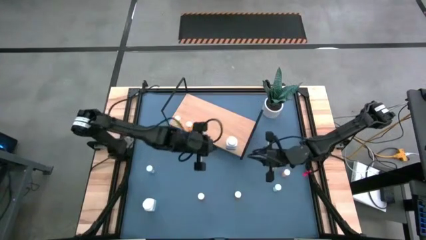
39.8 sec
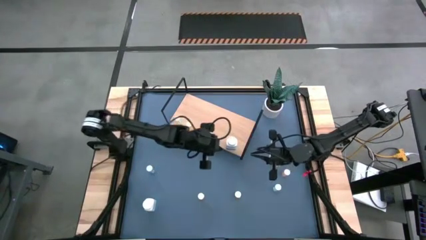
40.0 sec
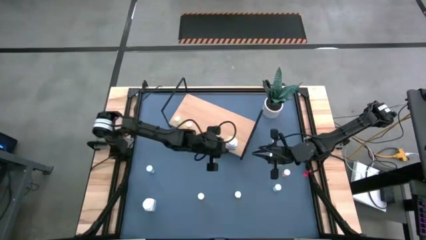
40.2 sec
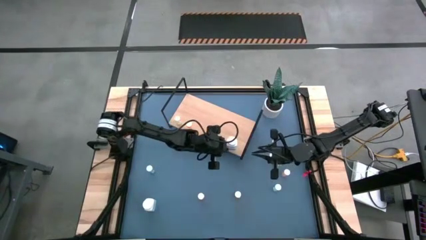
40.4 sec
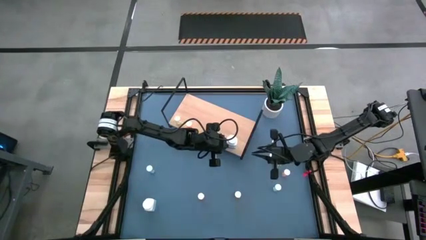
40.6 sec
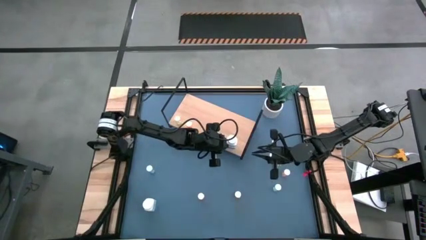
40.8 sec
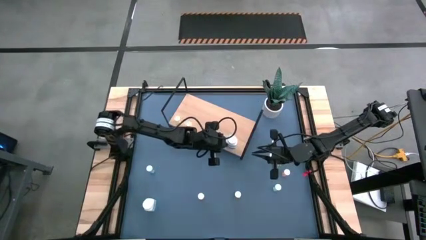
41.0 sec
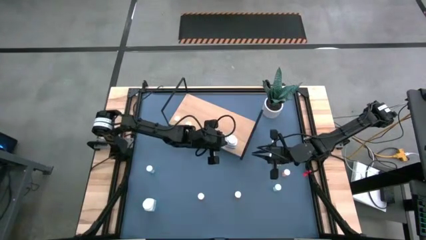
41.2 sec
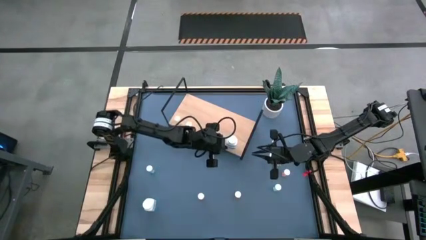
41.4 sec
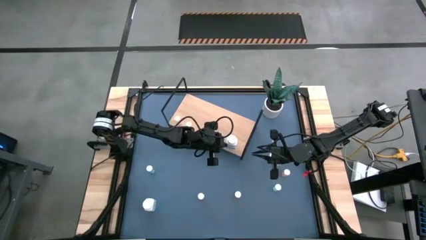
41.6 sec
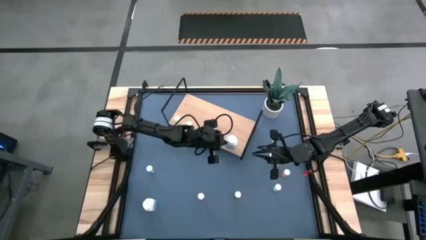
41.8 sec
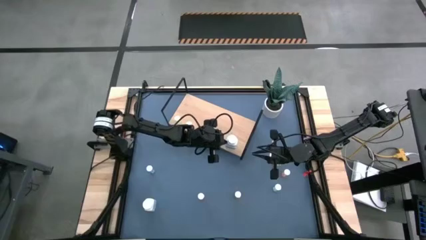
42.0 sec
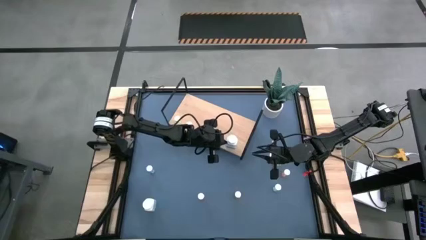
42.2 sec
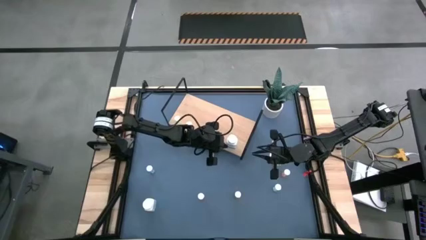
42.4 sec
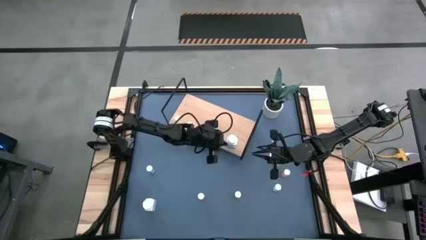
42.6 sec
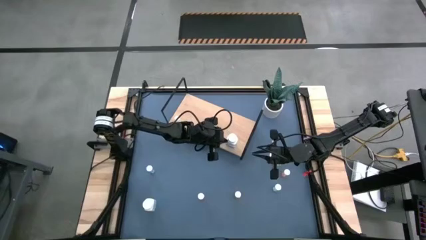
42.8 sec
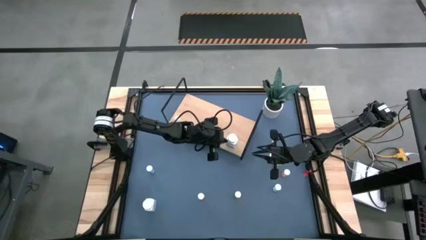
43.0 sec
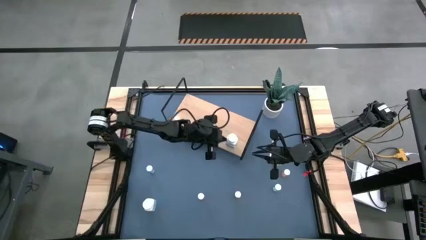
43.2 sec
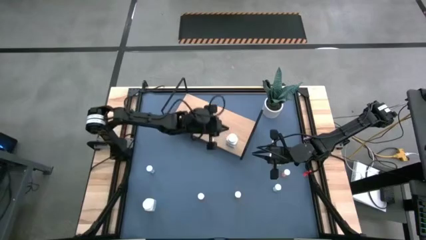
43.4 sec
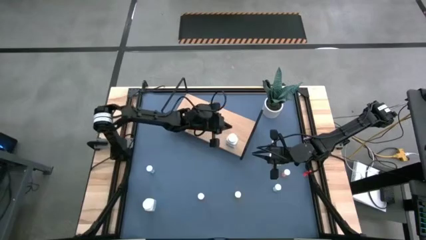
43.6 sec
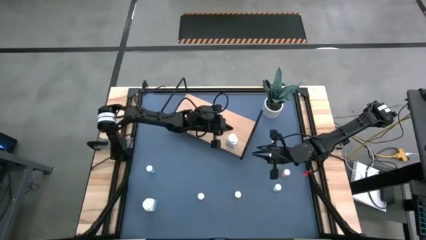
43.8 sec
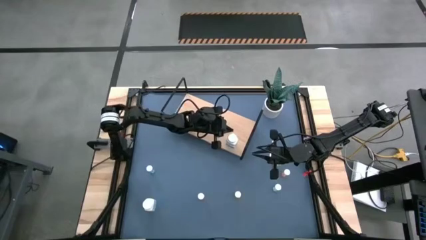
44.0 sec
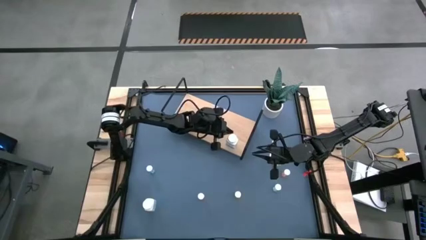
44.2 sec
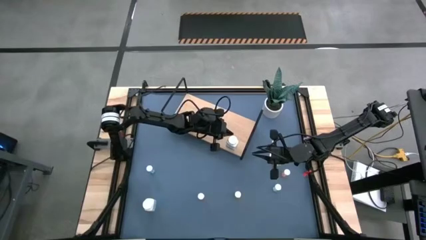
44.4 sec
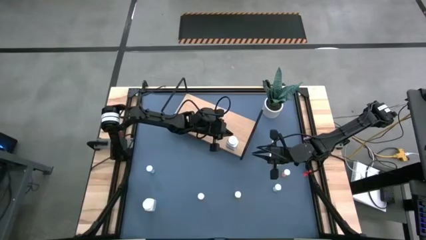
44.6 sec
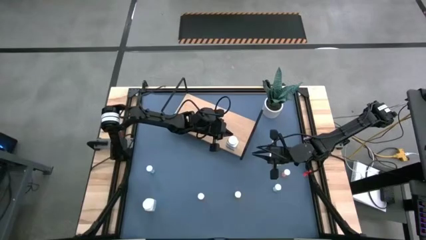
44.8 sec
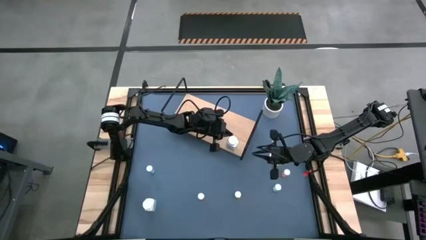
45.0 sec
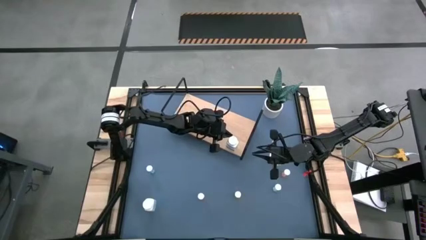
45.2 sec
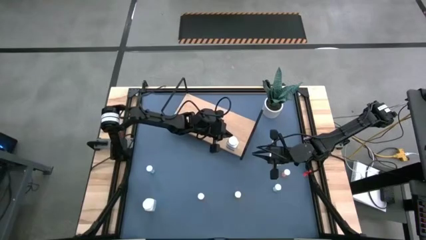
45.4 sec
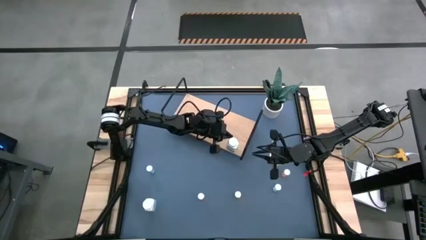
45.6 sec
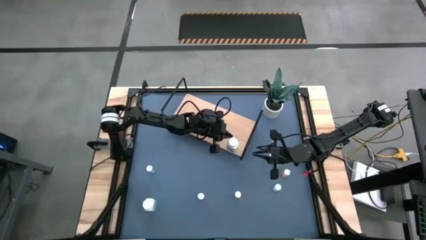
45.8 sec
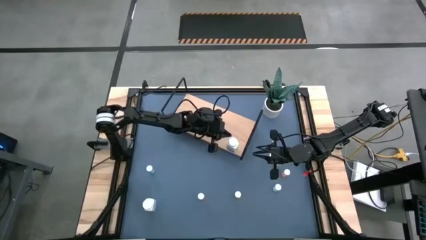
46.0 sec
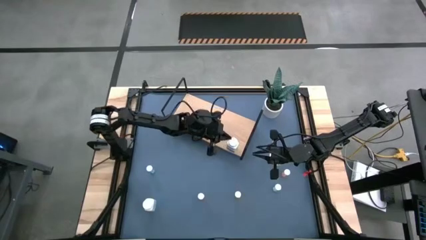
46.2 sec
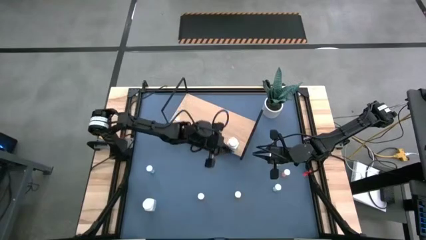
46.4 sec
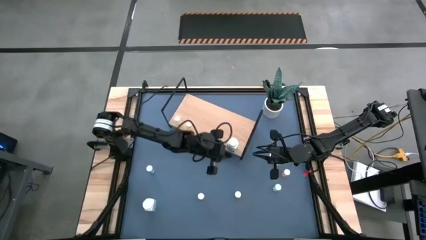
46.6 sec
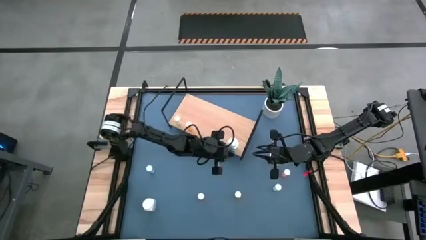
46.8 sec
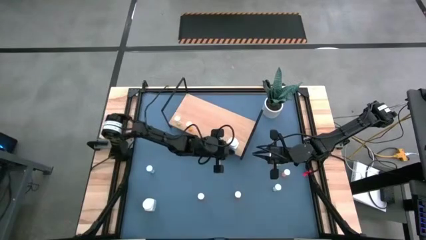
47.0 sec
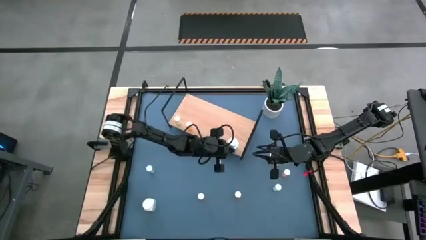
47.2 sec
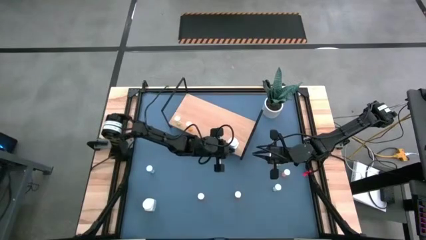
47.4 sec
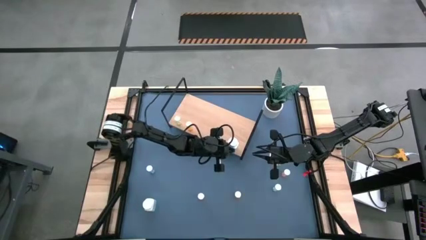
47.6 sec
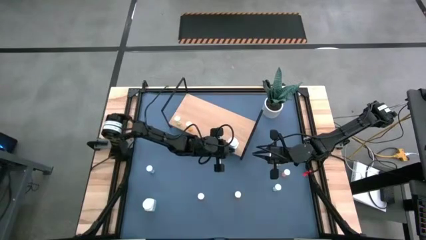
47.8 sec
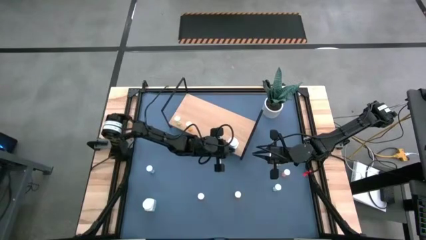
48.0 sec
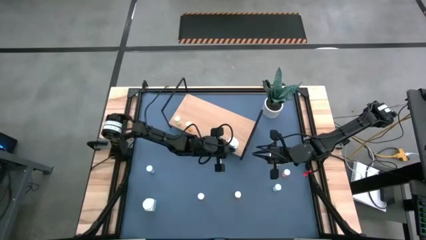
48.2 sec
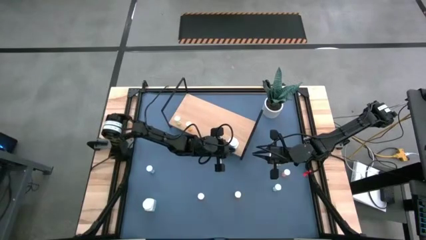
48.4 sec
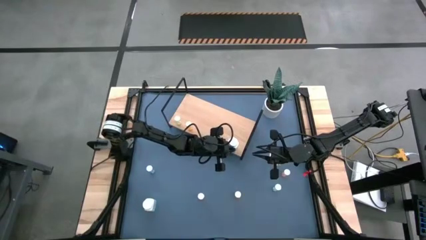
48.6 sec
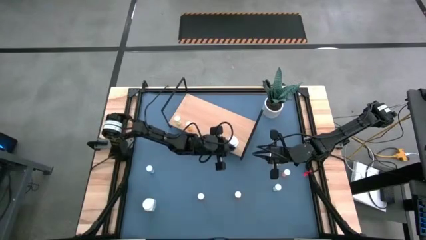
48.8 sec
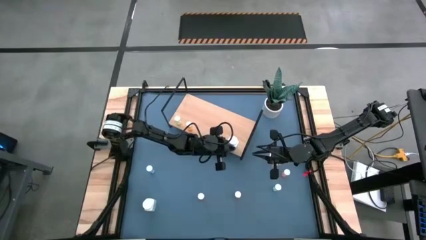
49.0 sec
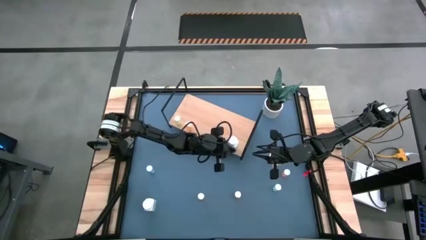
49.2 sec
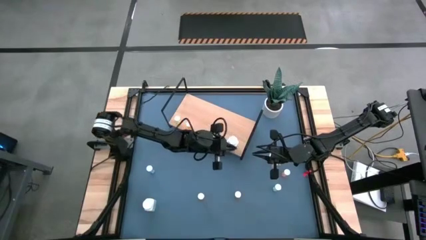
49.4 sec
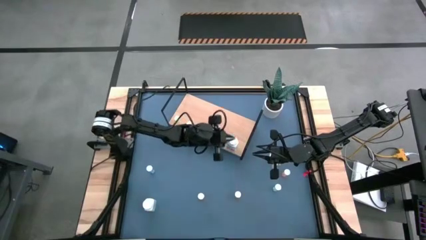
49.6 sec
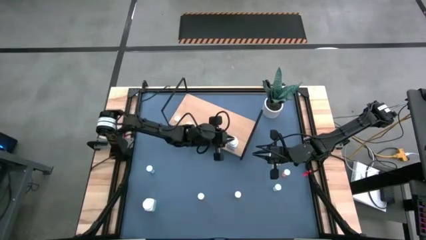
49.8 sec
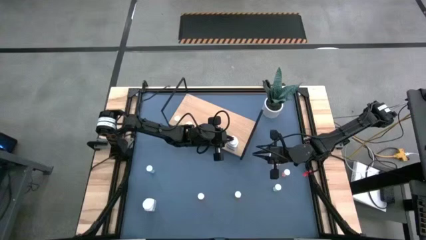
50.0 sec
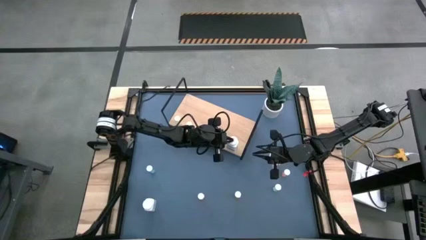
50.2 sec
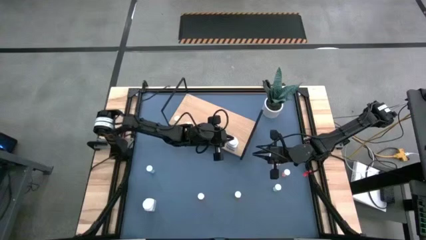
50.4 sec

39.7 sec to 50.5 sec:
Task: Pick and place medicine bottles onto shelf by color
Put the right white pill bottle on the shelf

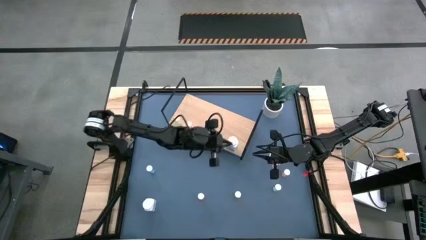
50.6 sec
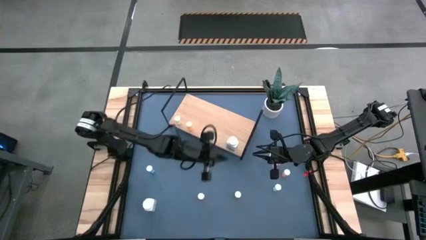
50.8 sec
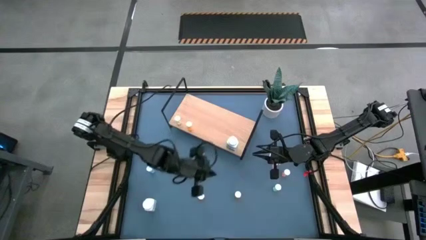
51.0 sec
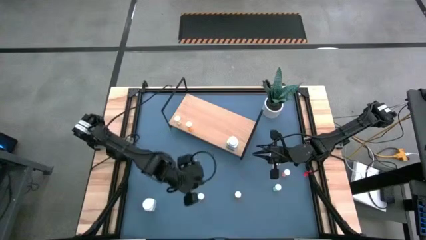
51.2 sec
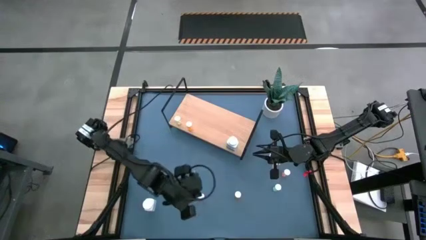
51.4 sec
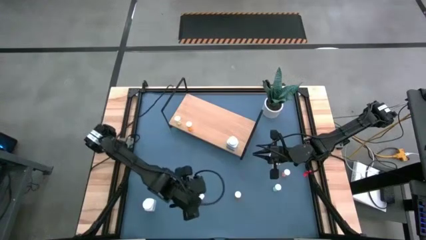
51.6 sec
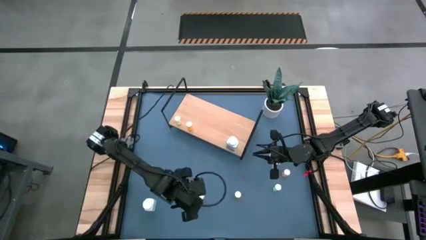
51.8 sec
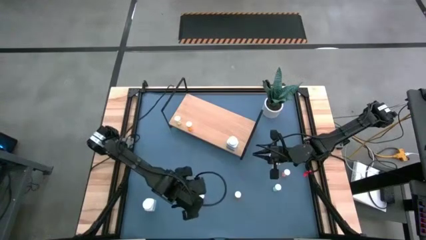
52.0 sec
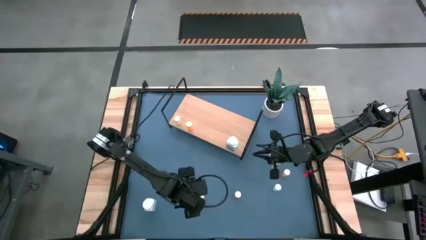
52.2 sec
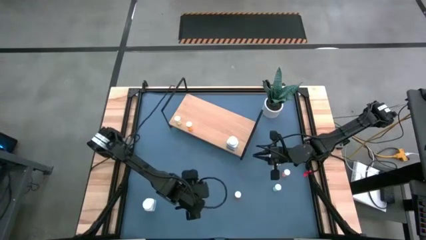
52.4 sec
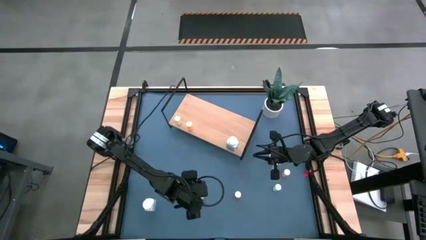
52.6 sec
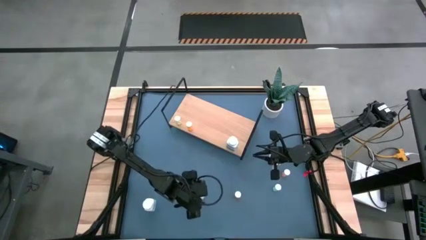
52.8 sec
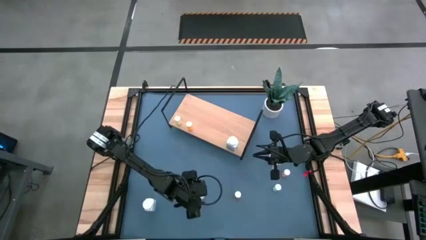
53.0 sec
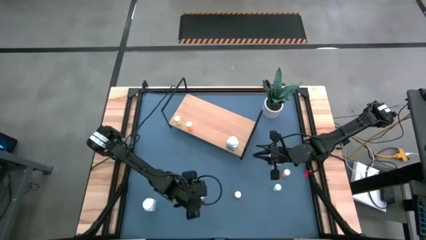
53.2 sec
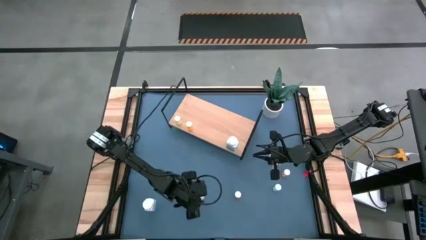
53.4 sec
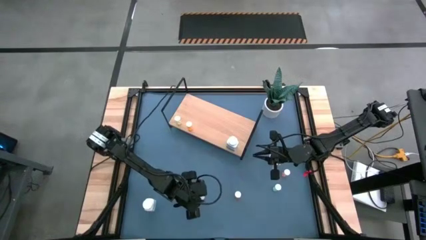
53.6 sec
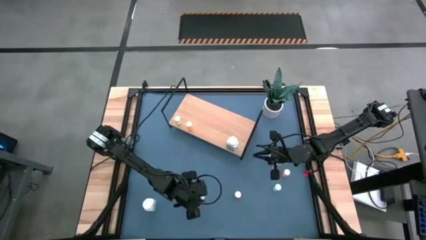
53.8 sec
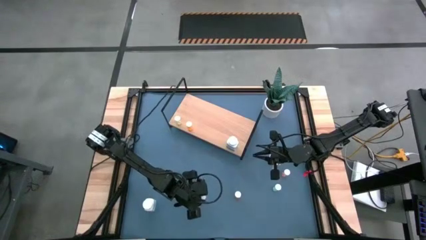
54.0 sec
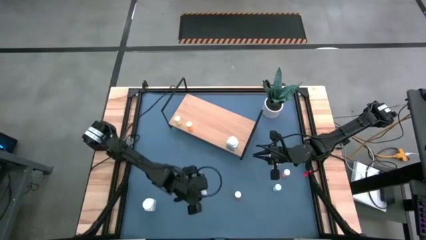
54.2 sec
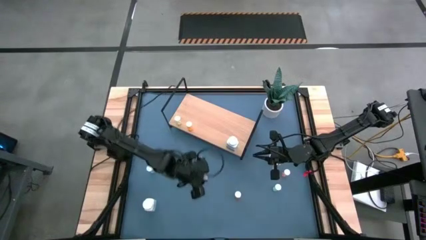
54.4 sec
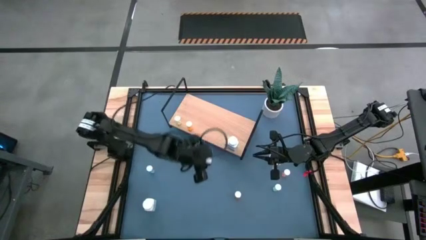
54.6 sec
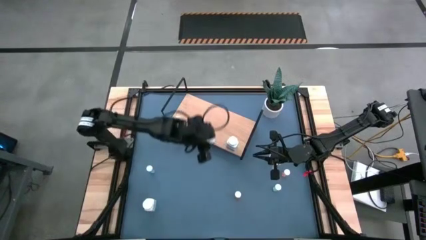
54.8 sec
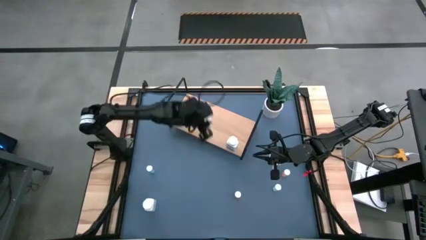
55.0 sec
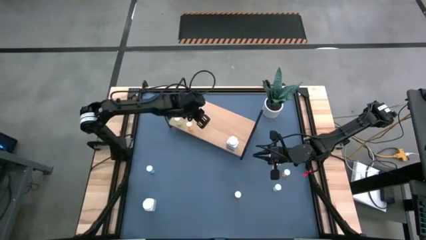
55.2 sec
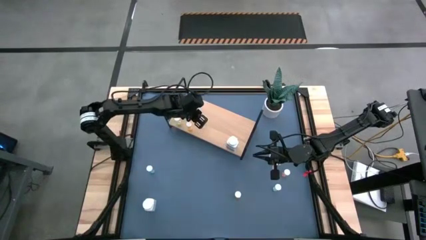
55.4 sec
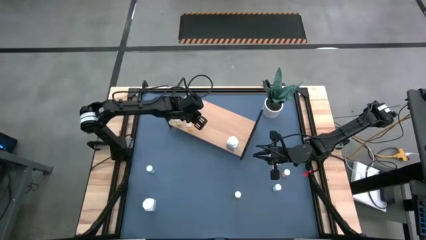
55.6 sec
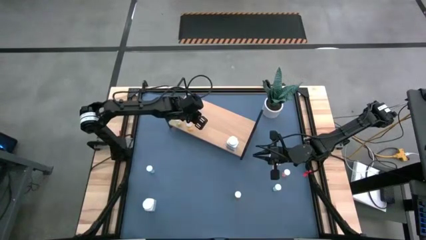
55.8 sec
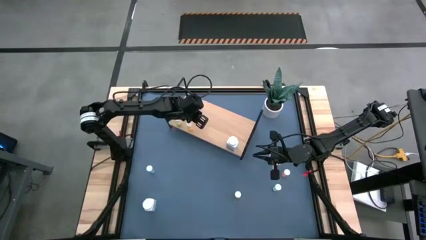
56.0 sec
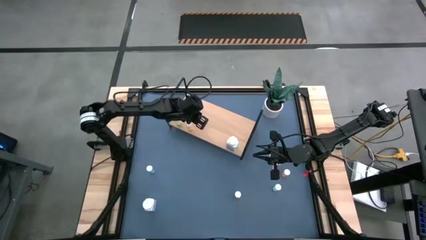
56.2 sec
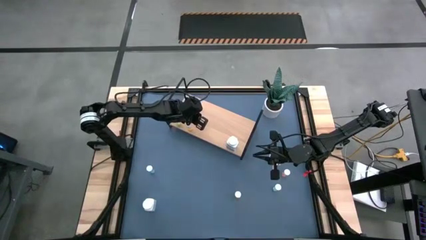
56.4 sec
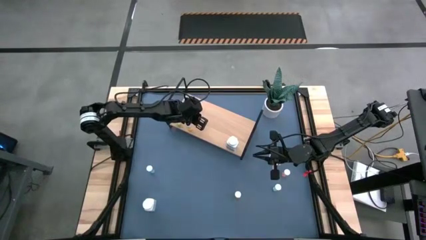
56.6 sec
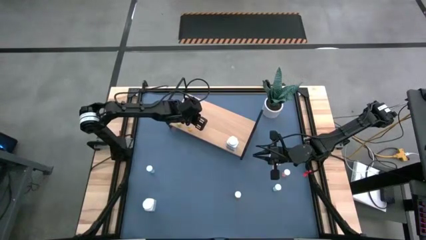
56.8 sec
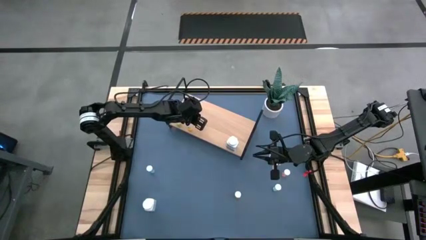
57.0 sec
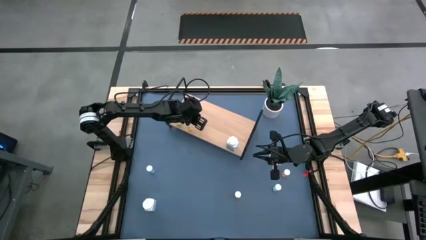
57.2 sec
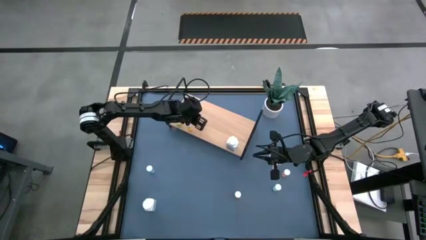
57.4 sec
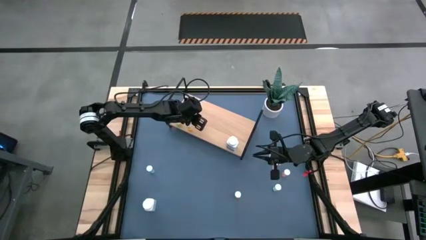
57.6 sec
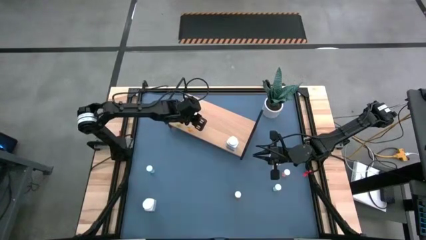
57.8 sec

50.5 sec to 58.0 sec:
Put the left pink pill bottle on the shelf
